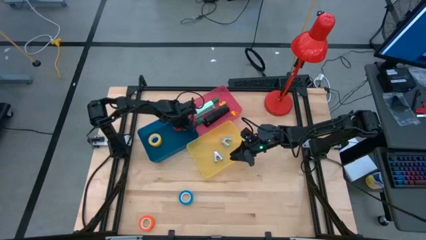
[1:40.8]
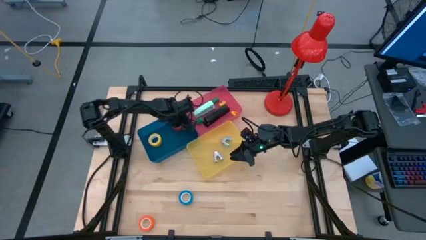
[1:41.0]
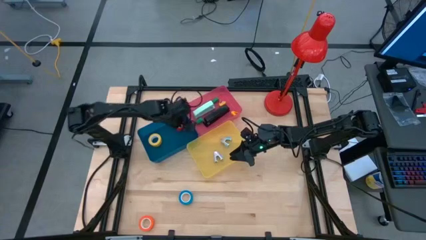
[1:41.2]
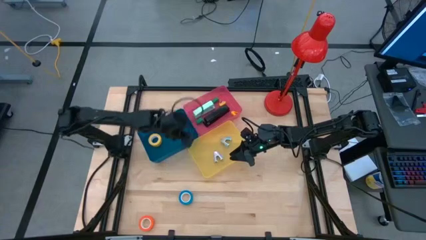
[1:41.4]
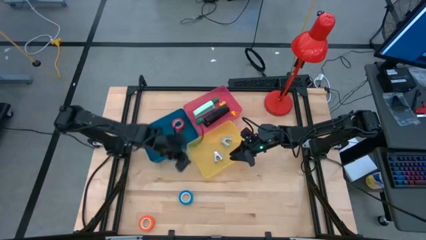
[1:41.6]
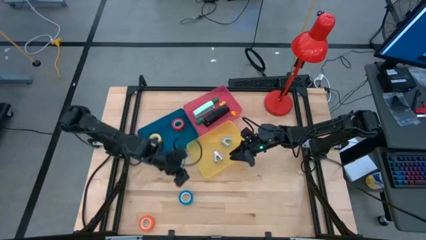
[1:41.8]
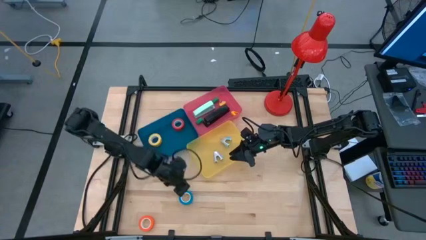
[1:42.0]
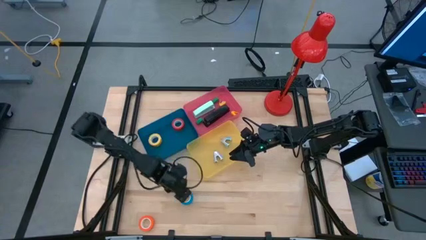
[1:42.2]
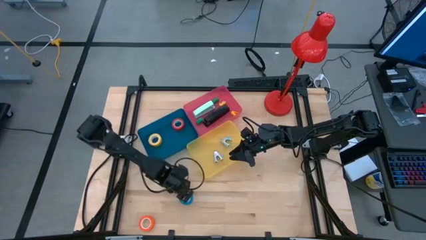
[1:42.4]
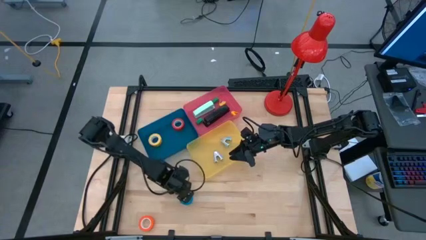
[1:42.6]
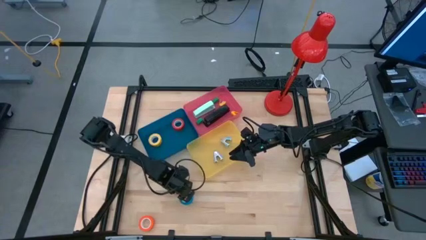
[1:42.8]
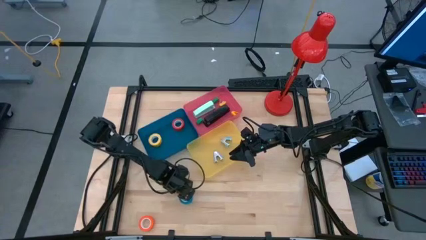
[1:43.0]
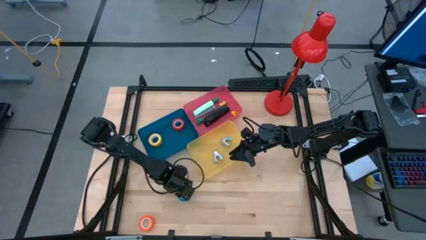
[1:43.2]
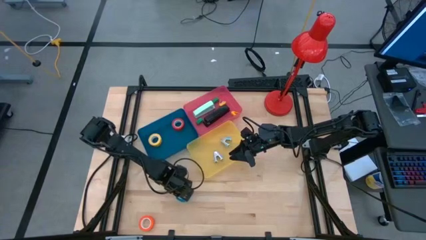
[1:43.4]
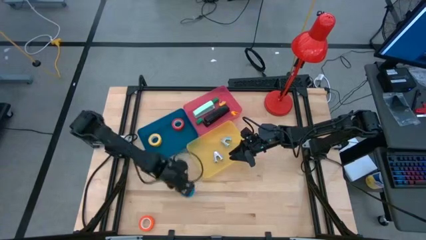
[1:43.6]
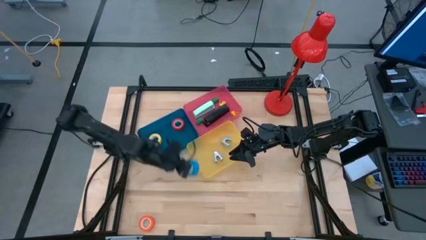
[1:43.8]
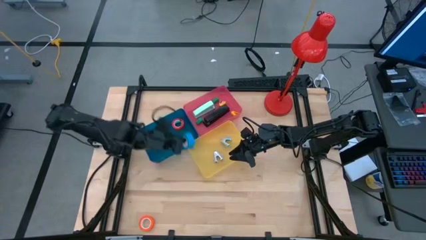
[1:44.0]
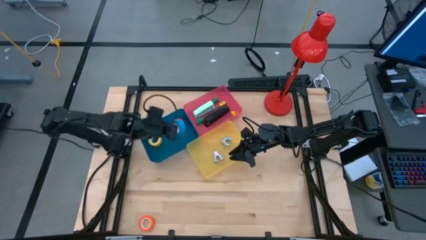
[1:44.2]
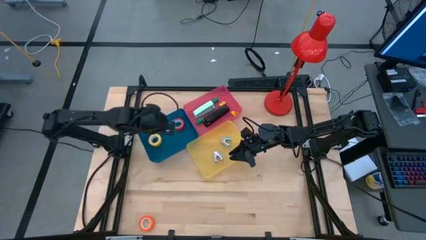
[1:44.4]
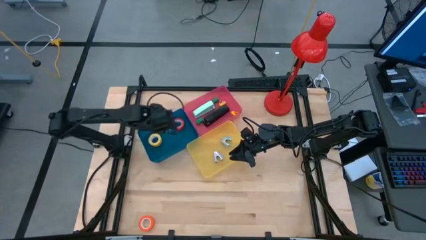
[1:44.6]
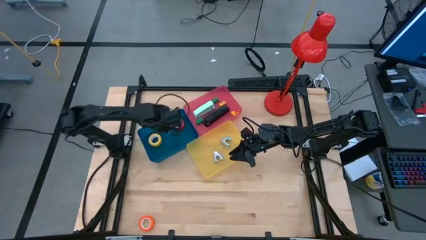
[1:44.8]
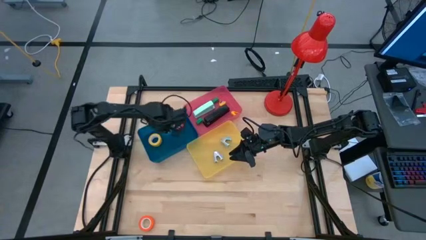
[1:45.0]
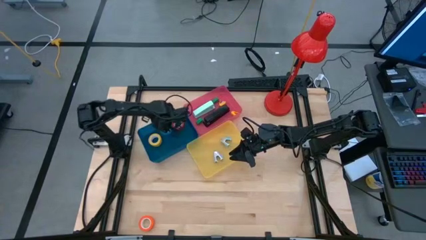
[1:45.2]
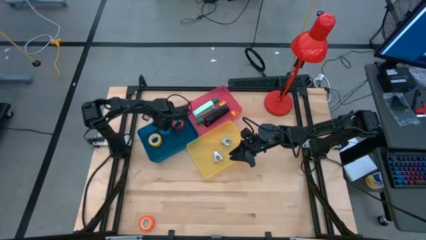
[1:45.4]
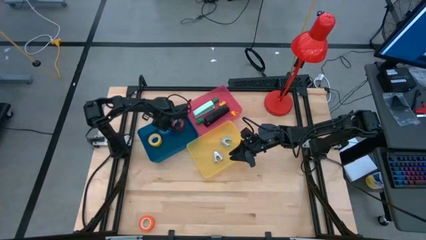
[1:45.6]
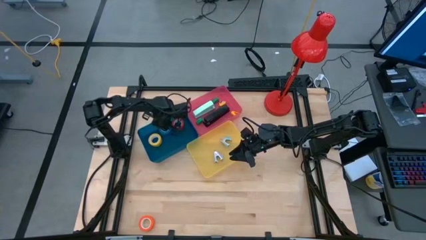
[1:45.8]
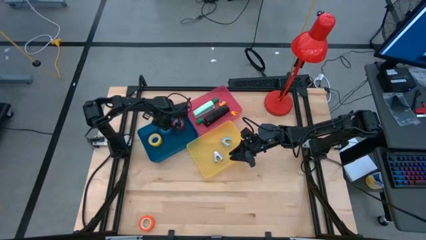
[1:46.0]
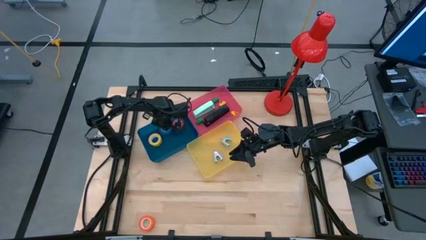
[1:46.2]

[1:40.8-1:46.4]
Task: Pick and place Stapler, Stapler remover, tape
Put the blue tape into the blue bin

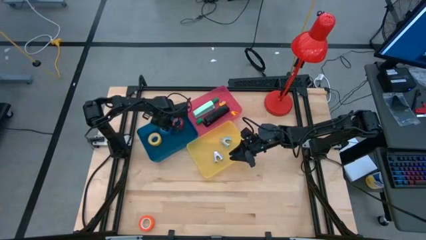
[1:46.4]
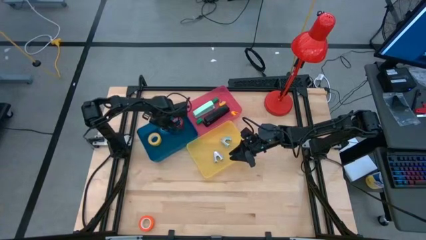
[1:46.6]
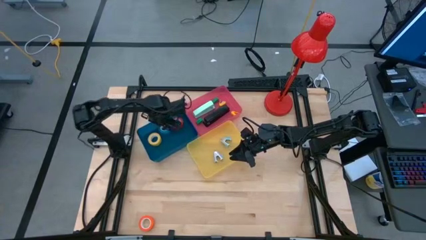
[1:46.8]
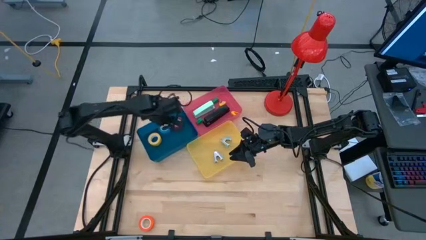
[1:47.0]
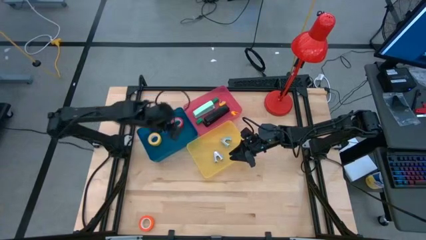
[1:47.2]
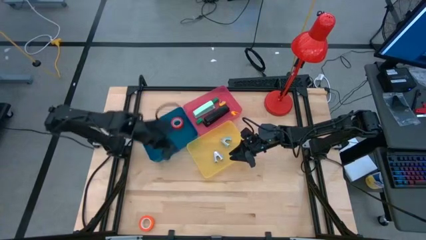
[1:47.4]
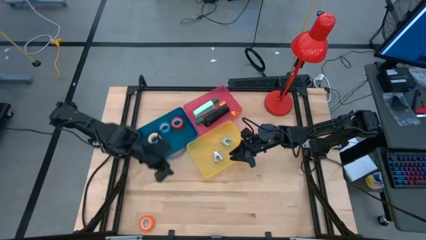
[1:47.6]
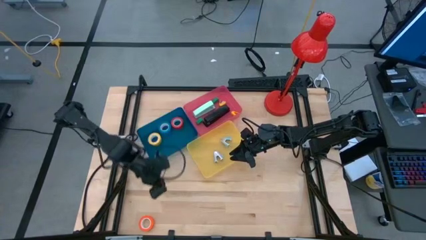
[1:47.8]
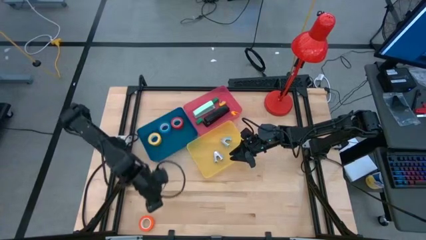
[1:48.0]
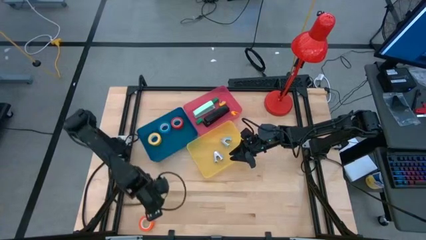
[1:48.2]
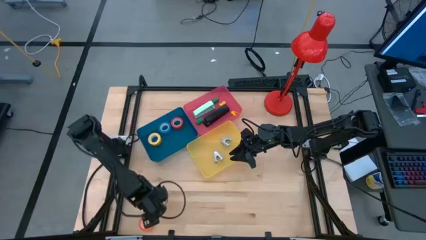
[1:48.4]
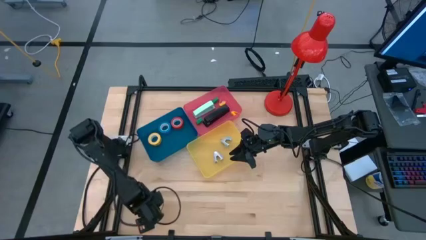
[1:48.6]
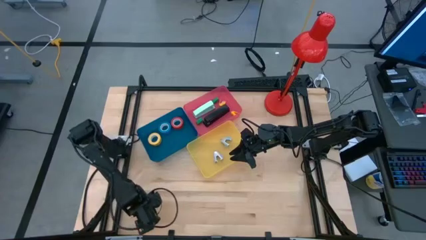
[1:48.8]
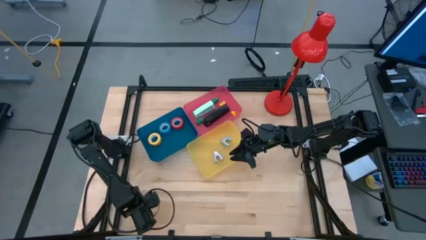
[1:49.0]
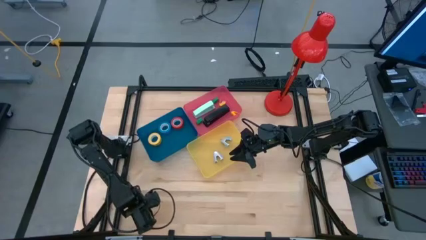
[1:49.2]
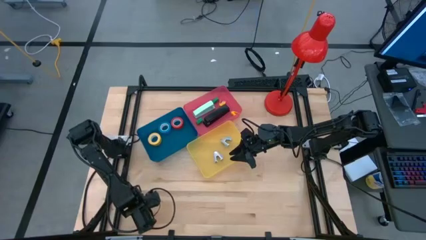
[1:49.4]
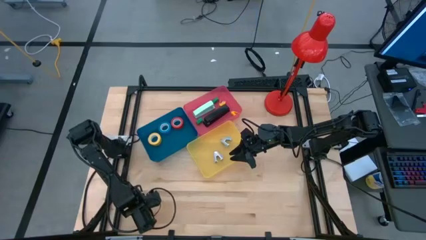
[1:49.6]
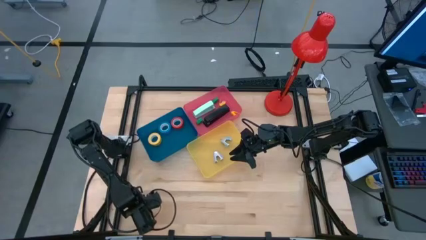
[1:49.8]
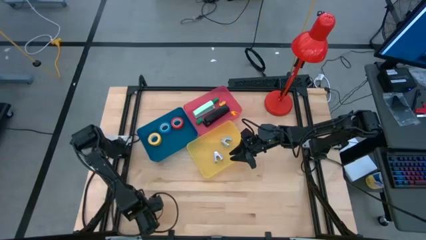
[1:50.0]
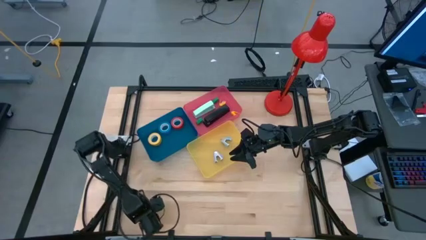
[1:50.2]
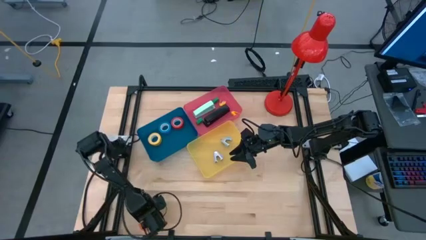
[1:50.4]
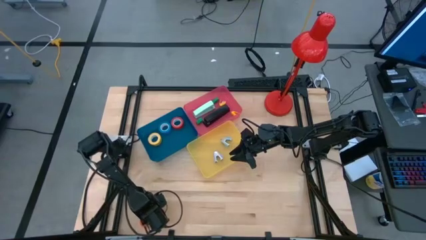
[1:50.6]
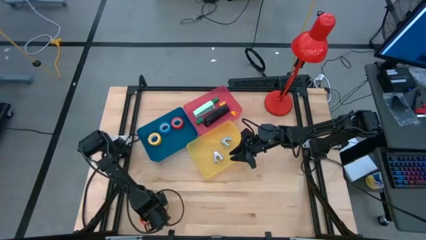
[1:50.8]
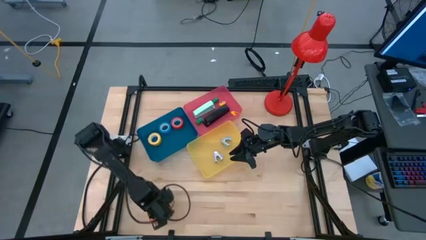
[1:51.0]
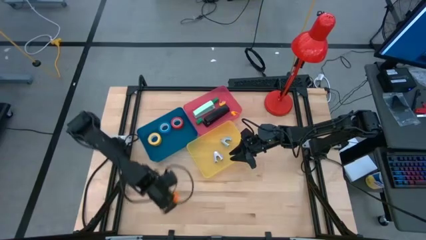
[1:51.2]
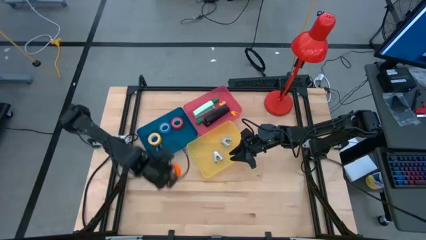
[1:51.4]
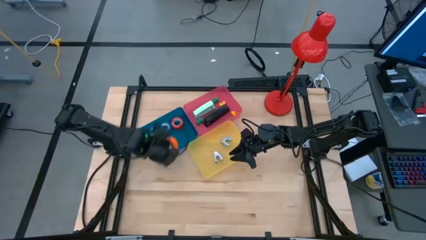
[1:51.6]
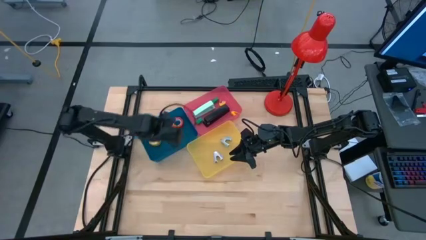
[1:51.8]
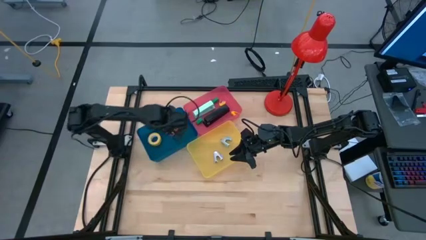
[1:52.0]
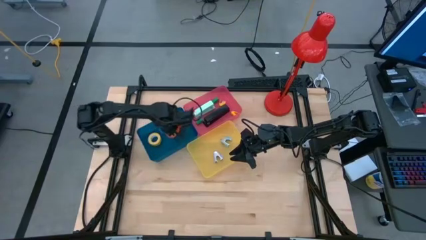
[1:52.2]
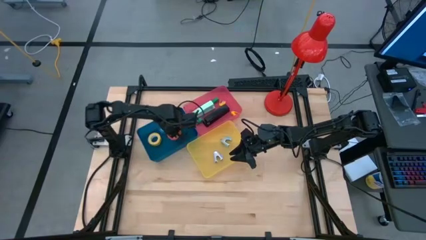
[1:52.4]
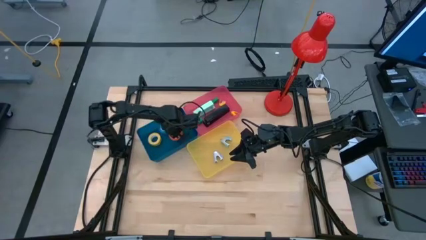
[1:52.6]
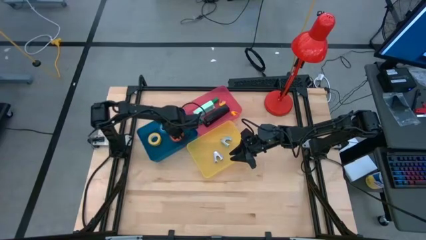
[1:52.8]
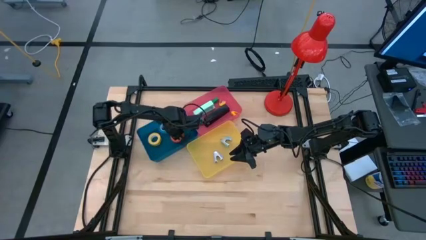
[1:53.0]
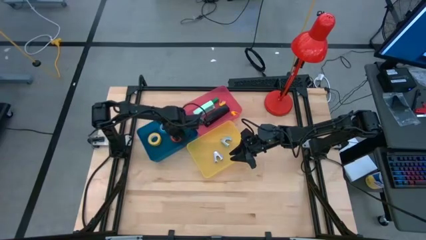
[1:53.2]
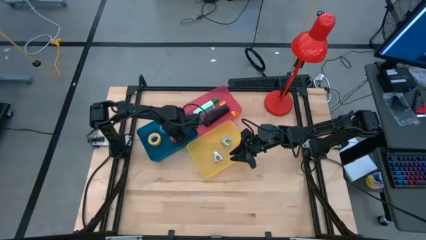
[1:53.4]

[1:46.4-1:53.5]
Put the orange tape into the blue bin

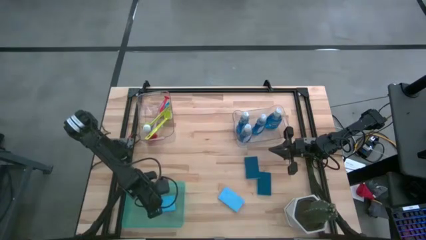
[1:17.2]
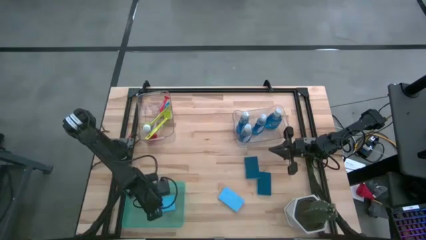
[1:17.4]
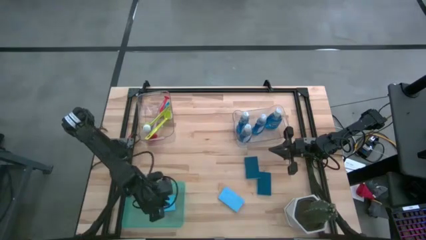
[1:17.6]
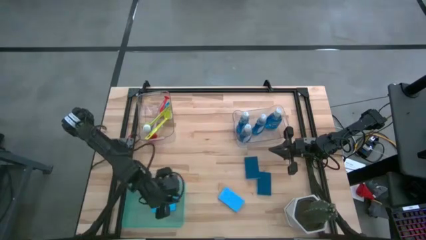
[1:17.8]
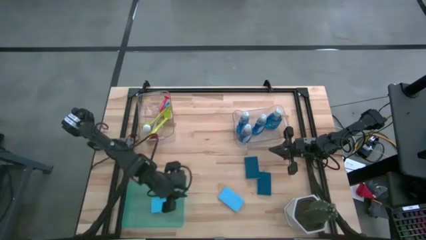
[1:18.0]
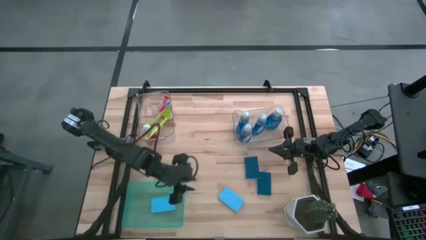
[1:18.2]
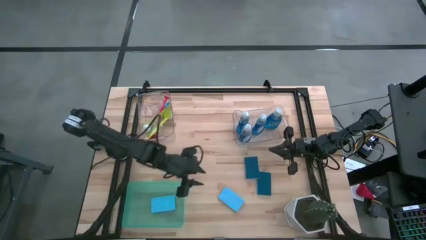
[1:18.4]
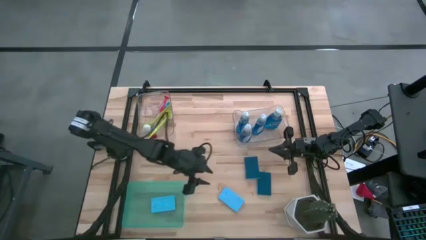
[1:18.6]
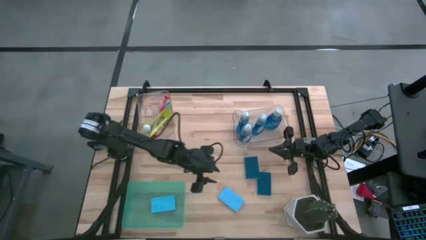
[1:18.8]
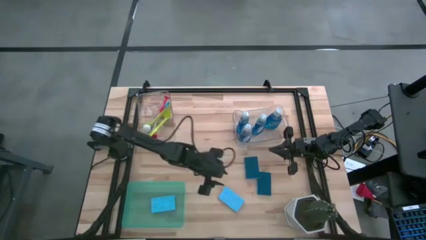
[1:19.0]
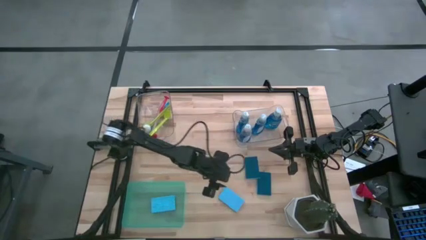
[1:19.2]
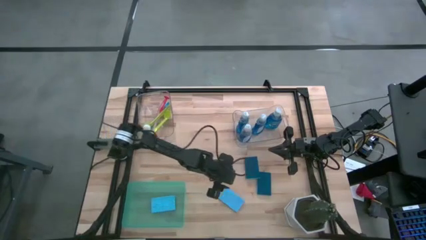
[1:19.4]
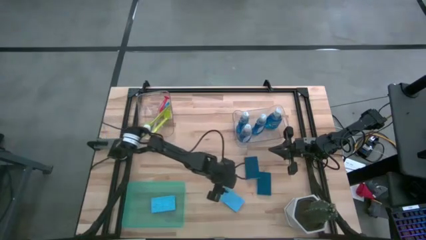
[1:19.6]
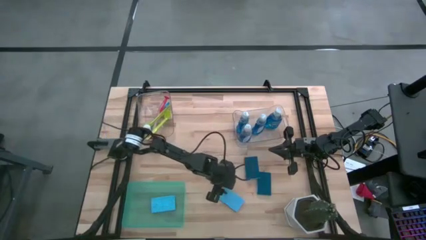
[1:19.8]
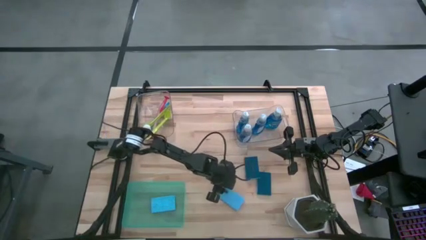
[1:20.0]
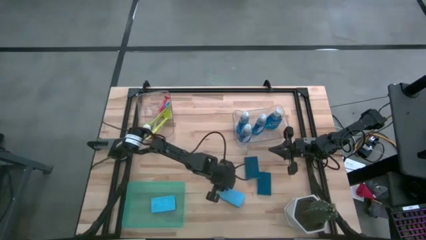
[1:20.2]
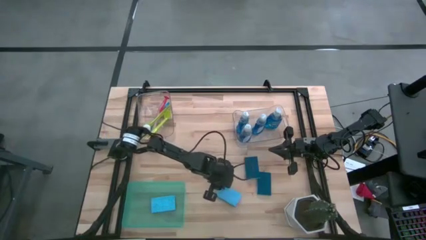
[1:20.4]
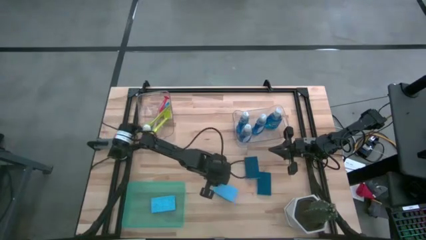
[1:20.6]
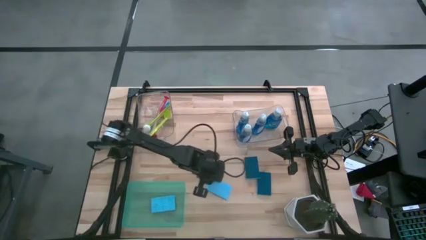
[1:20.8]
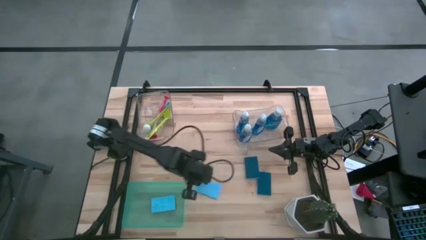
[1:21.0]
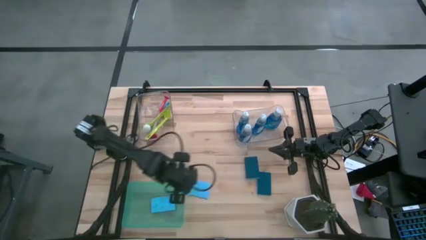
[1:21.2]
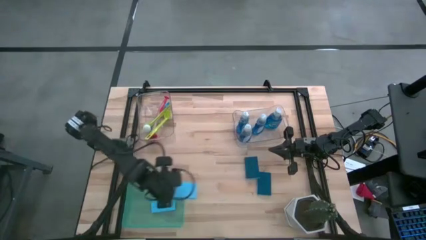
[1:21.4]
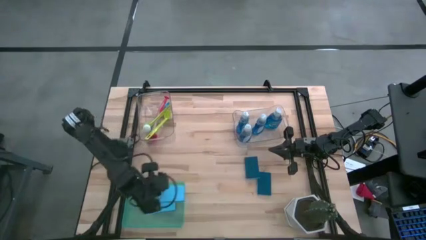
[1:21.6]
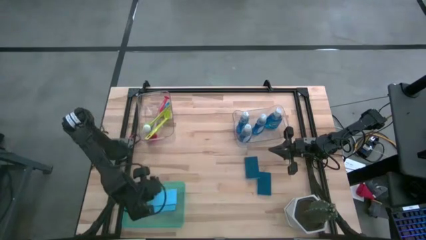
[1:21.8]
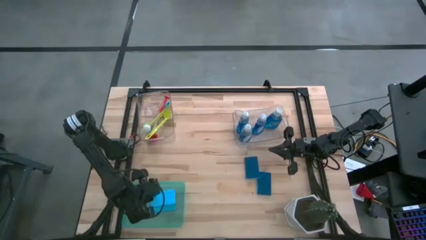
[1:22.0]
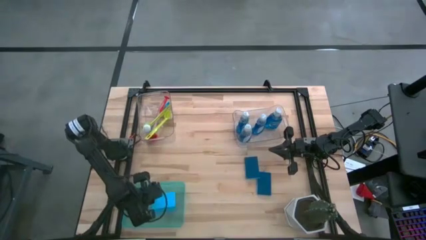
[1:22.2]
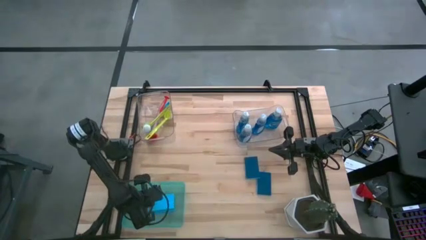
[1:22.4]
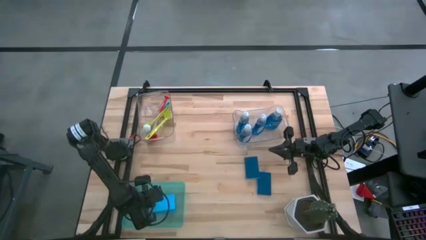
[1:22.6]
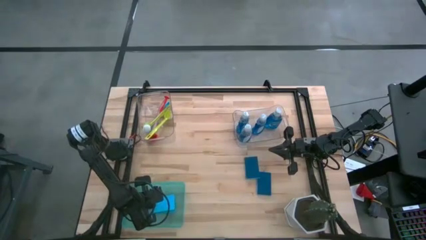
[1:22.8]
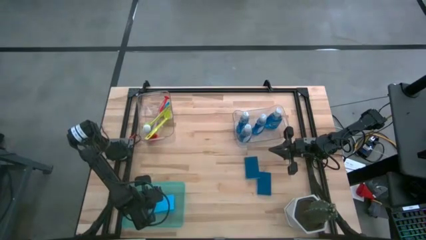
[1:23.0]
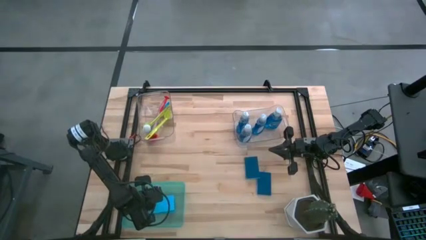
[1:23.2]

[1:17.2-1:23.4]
Task: Pick & Place Kitchen Sink Supplies
Stack the blue sponge on top of the blue sponge in the green bin
